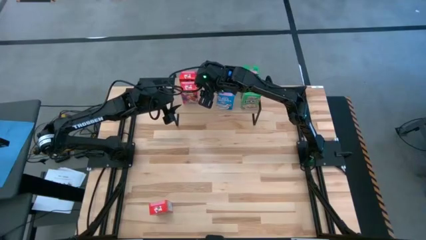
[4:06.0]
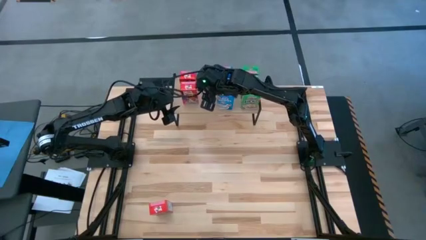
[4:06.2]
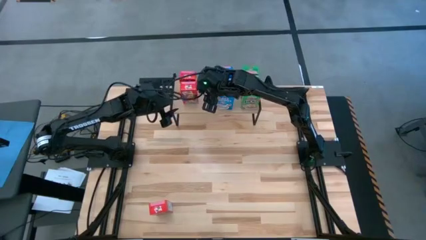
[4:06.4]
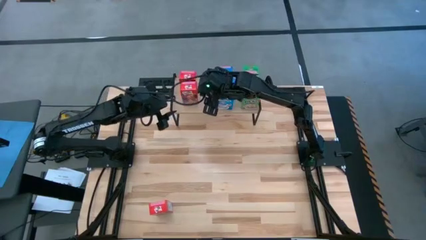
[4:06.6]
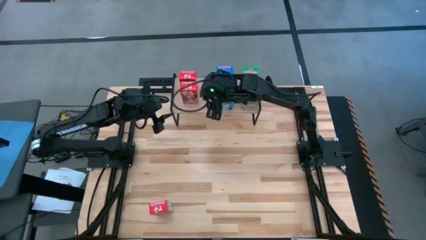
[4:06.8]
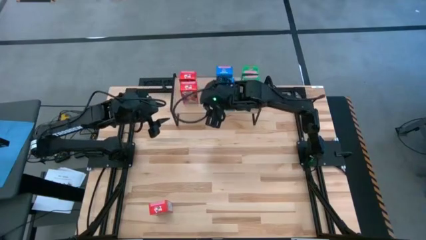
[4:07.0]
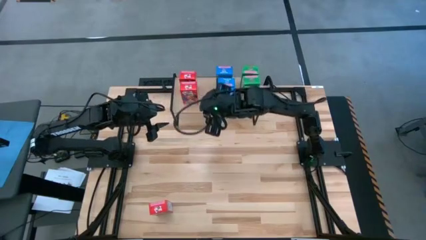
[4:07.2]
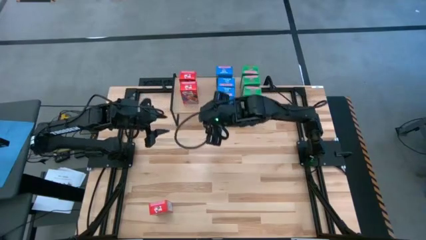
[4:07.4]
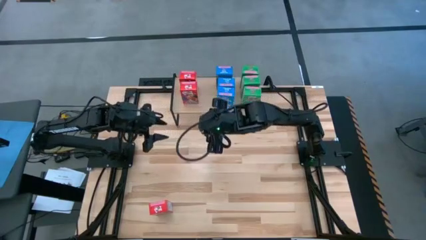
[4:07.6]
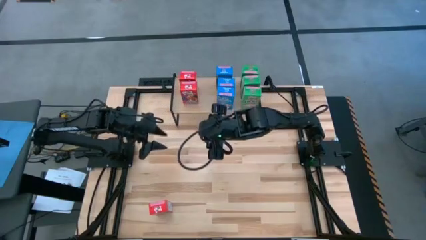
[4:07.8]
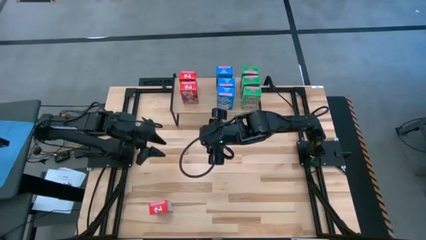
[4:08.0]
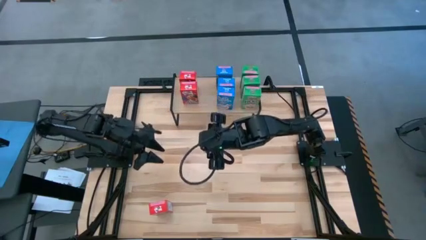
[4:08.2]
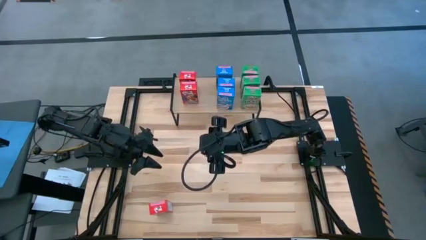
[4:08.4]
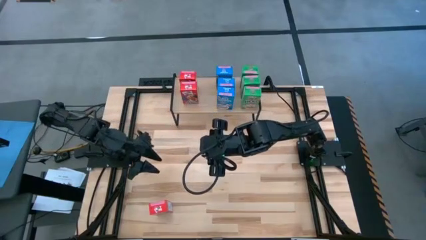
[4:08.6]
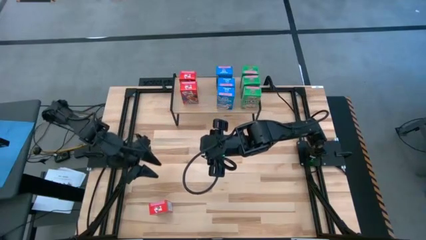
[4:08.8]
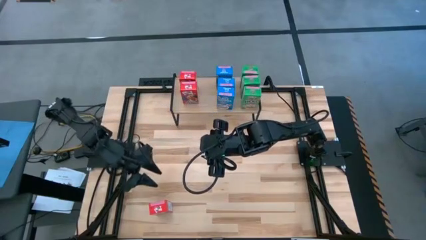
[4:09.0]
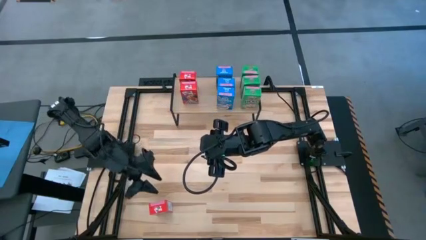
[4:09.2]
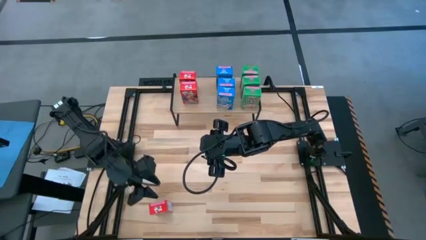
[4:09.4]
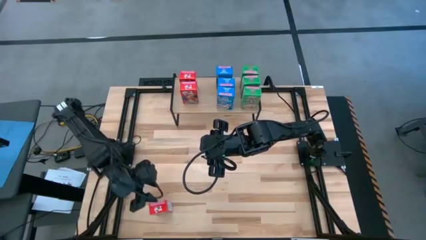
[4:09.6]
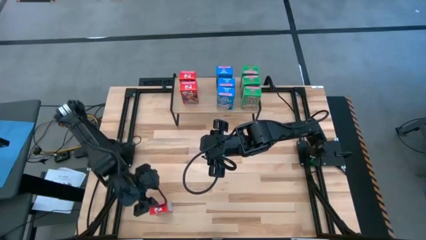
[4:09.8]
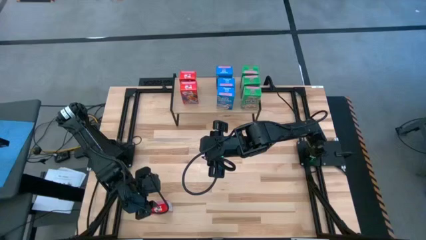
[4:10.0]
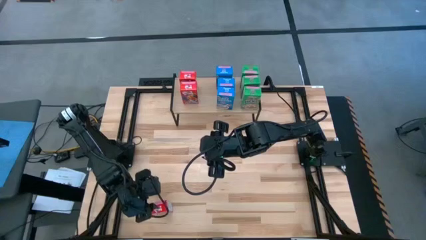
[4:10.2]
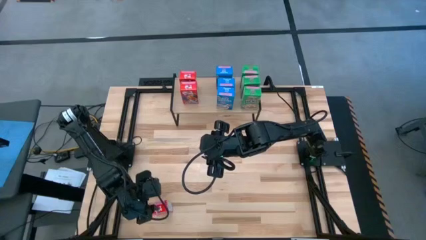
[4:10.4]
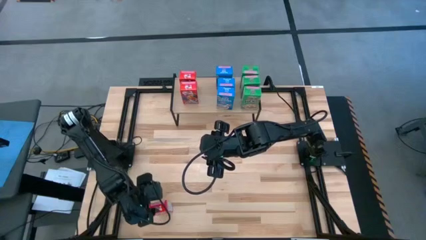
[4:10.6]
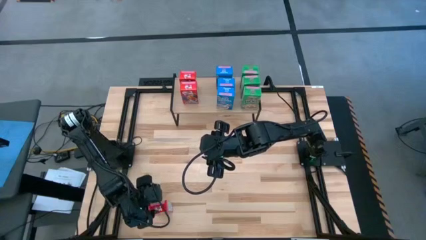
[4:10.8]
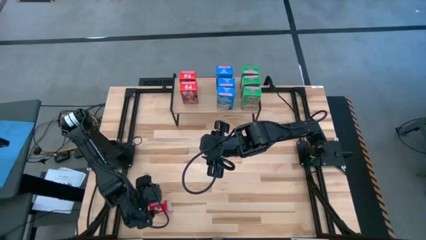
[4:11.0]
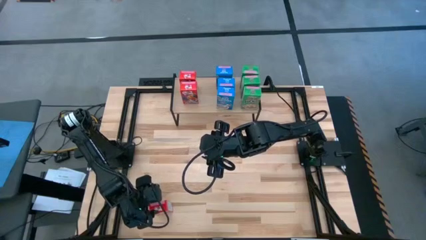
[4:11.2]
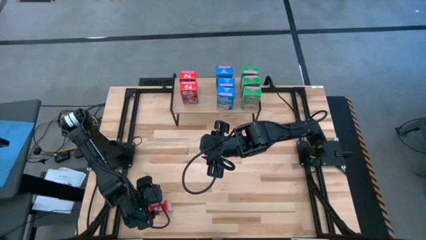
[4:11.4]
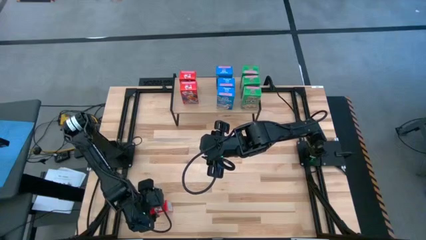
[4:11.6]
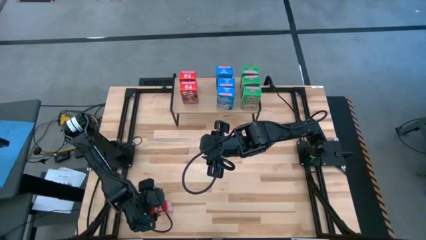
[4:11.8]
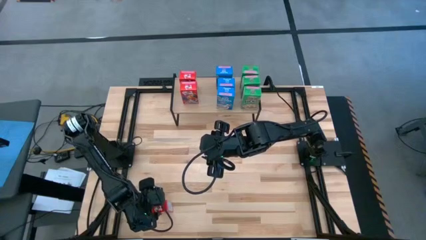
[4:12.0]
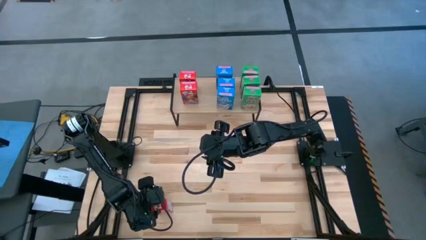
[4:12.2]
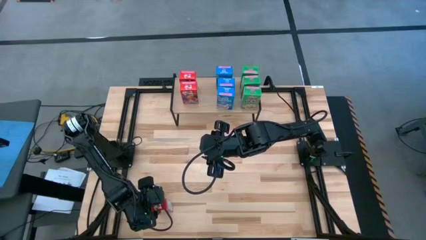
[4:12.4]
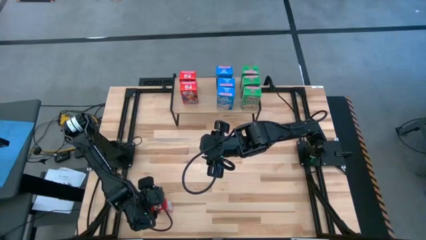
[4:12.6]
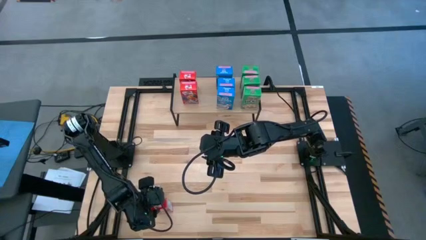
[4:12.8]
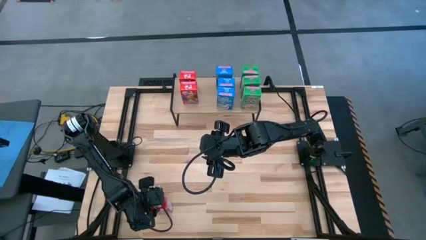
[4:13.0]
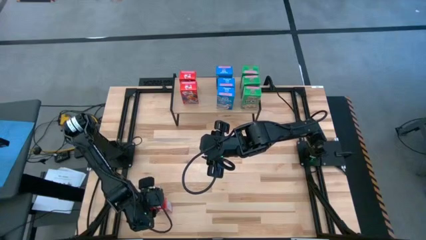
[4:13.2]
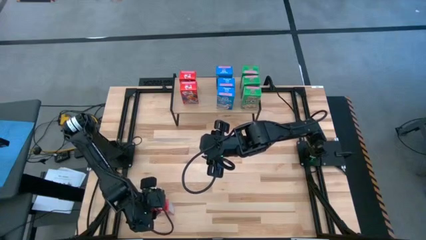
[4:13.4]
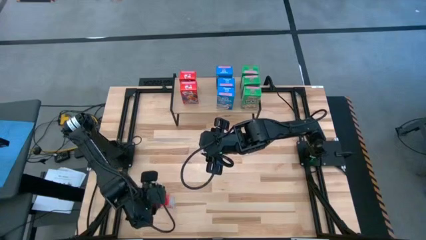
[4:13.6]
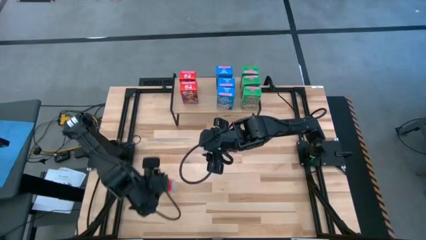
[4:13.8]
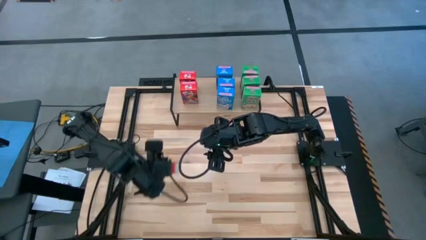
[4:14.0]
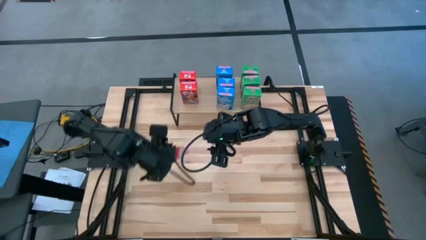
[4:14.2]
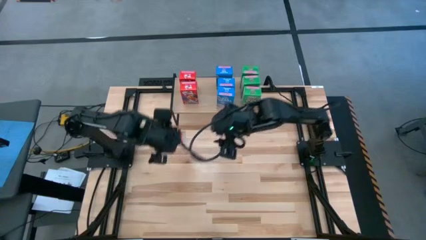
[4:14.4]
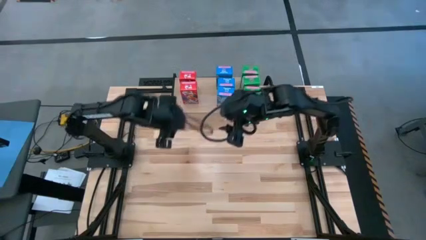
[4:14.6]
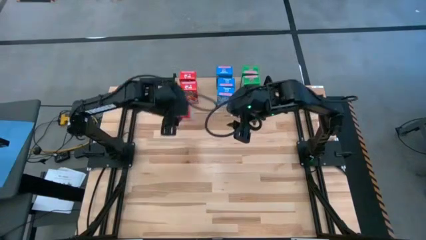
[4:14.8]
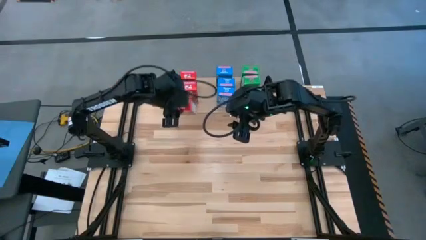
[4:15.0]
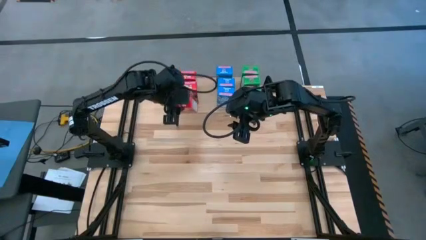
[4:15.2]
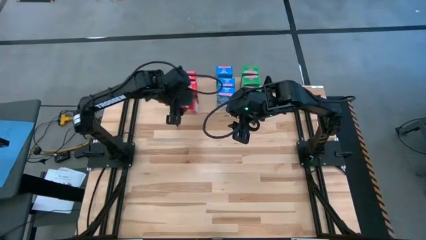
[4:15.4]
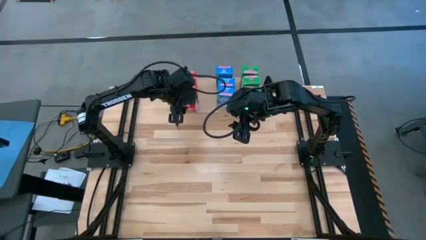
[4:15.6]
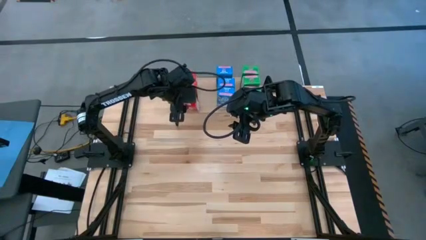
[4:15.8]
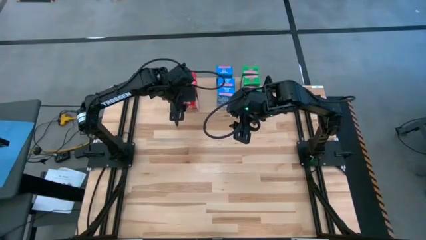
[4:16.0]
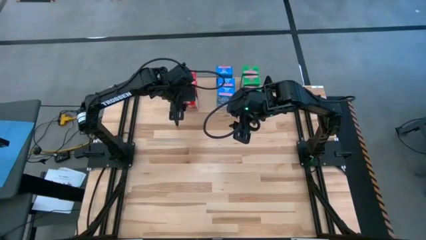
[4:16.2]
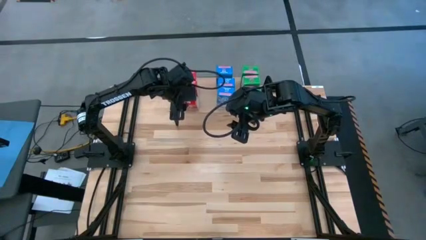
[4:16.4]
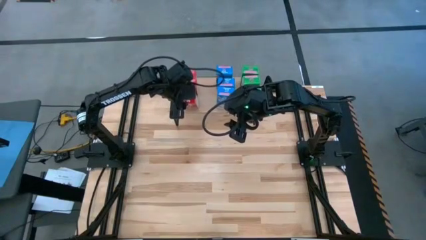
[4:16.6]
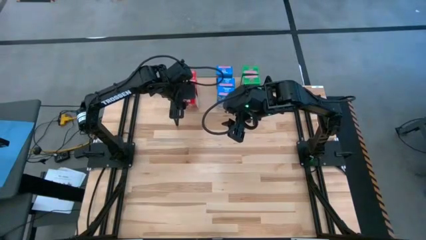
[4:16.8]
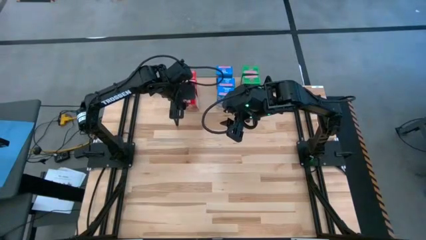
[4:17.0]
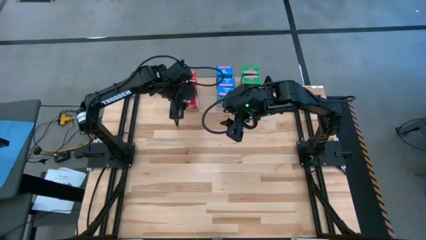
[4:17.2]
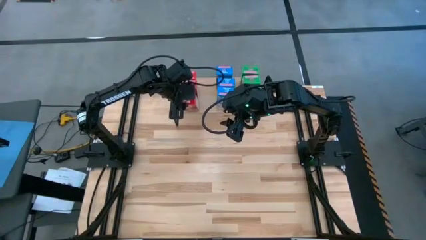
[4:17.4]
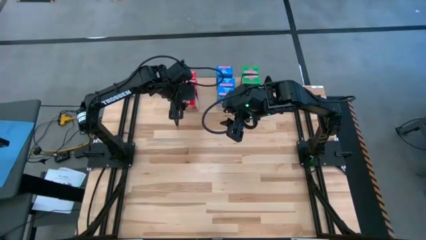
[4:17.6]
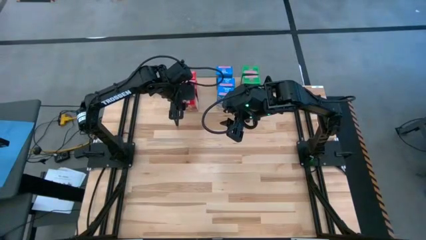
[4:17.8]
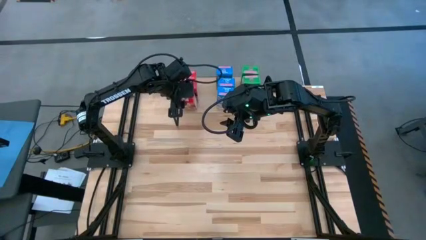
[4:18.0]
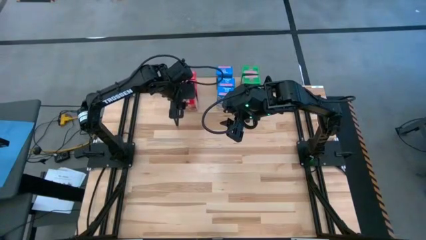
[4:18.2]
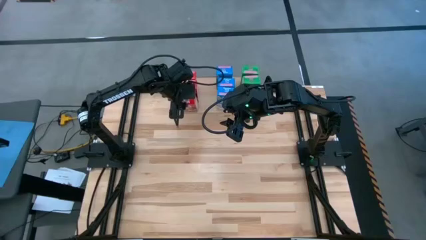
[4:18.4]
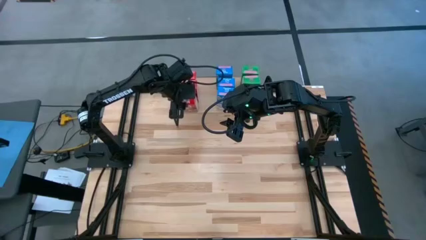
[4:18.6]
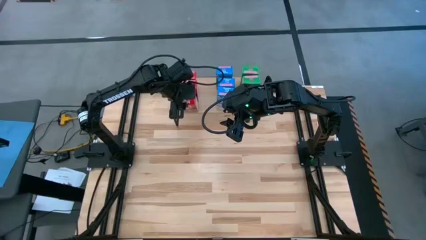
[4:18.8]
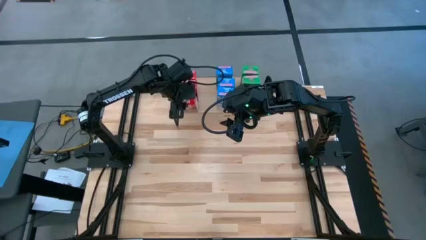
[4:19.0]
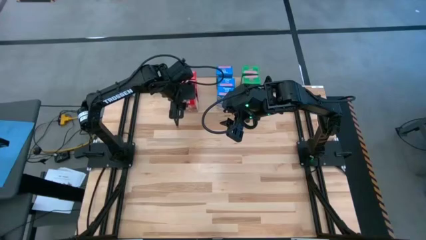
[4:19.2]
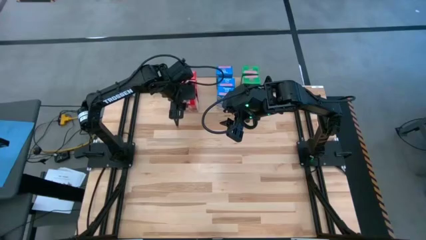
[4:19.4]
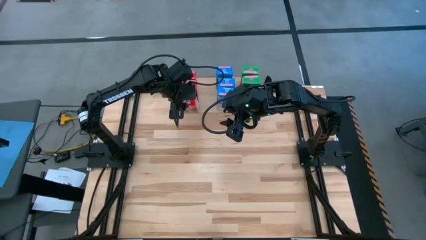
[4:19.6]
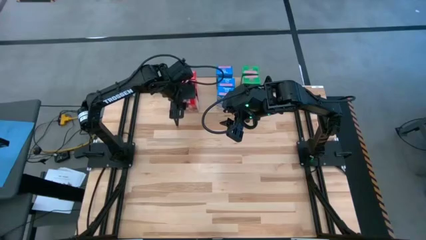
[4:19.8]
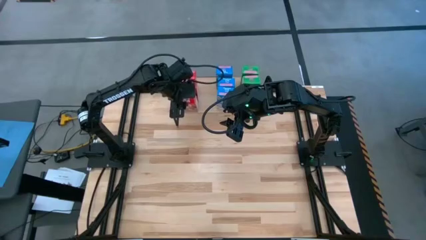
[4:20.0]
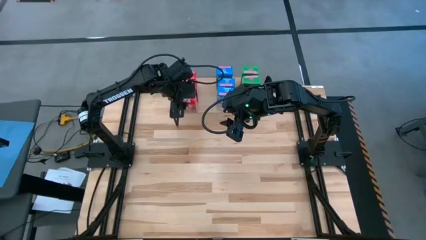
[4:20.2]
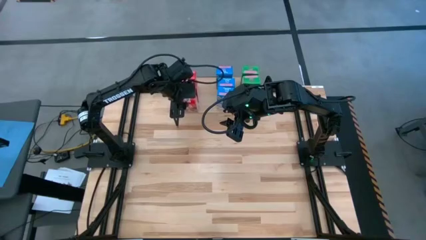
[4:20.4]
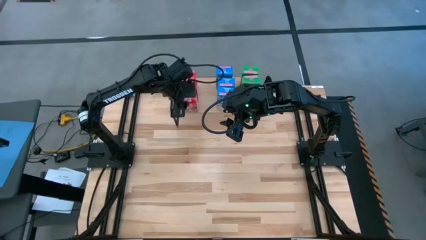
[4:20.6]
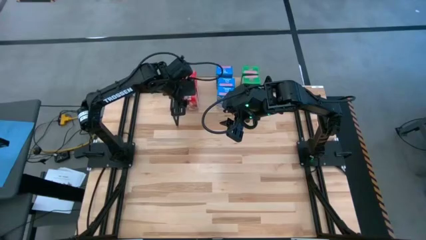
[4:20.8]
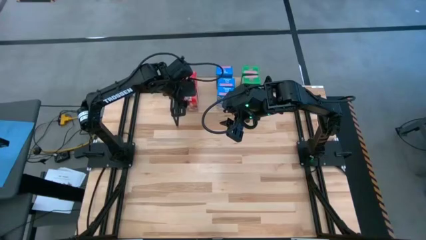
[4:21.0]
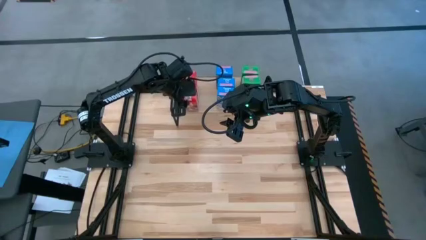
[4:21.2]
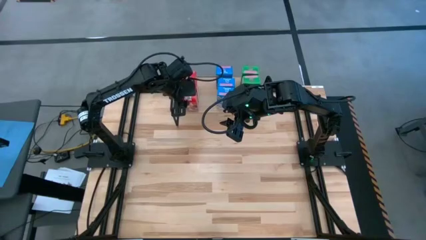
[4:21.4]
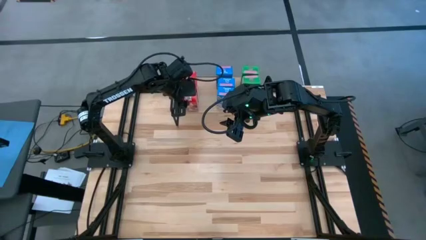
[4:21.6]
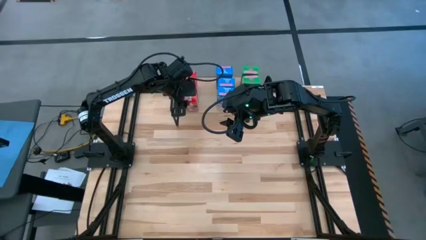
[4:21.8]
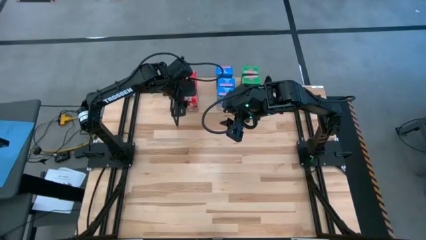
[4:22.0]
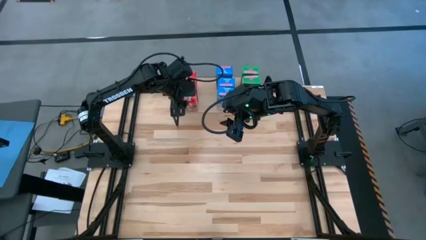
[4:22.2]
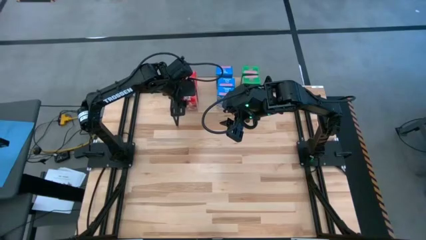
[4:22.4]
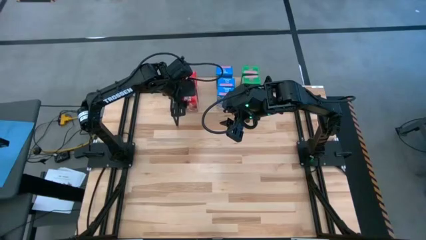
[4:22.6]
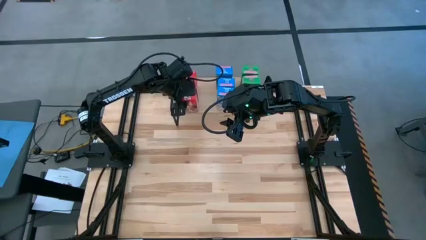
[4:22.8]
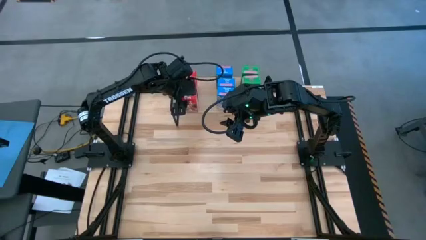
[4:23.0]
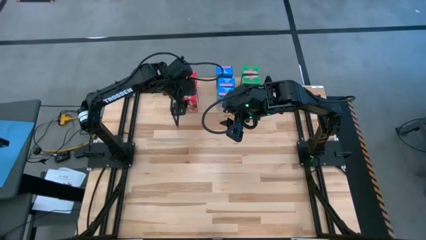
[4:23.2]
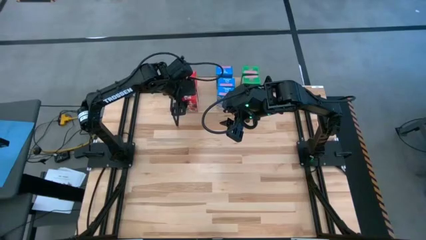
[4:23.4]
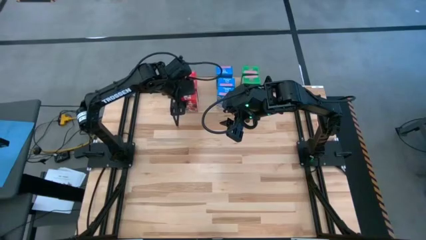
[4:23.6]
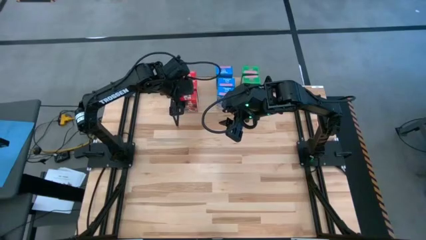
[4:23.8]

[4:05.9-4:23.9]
Task: Stack cereal on shelf
Put the red cereal box on the shelf
